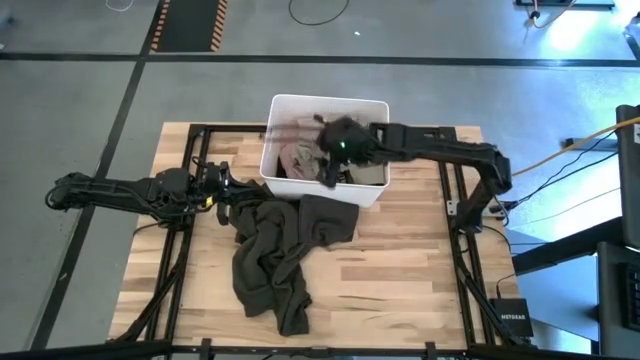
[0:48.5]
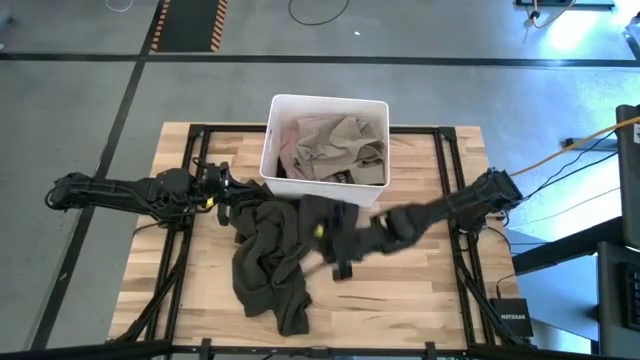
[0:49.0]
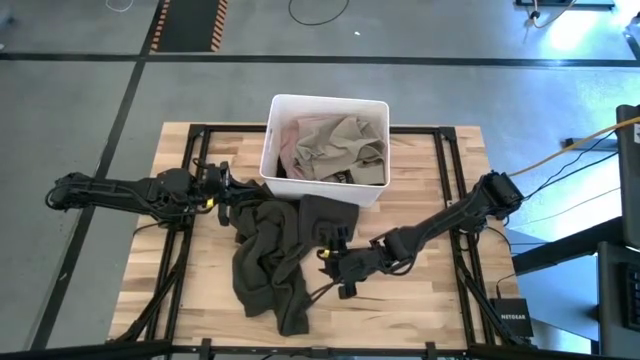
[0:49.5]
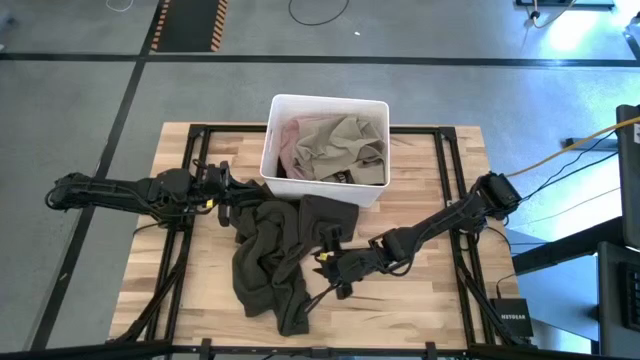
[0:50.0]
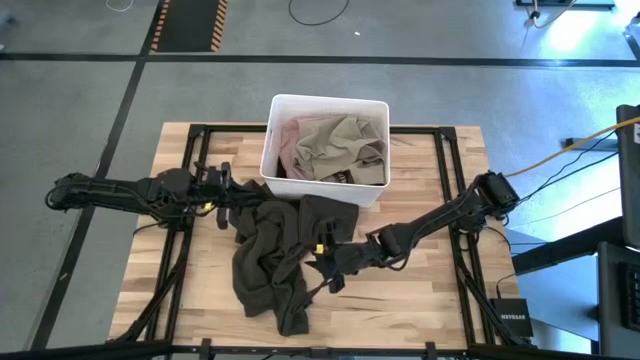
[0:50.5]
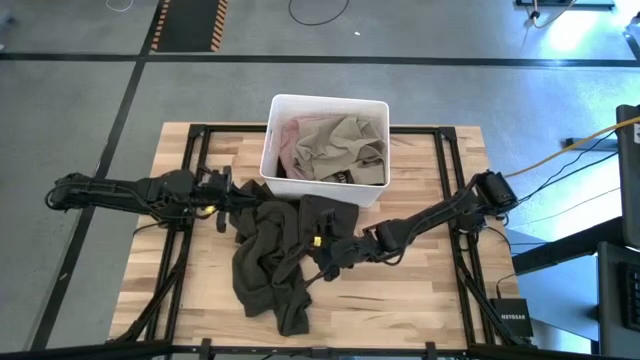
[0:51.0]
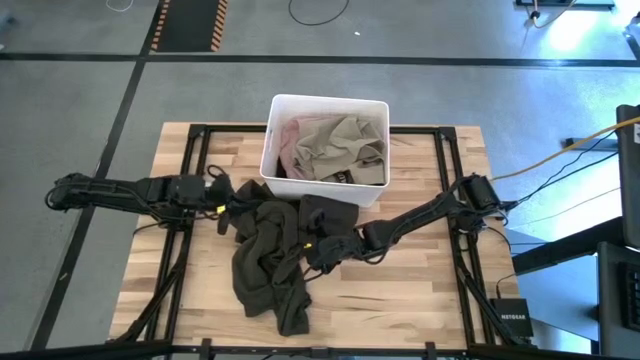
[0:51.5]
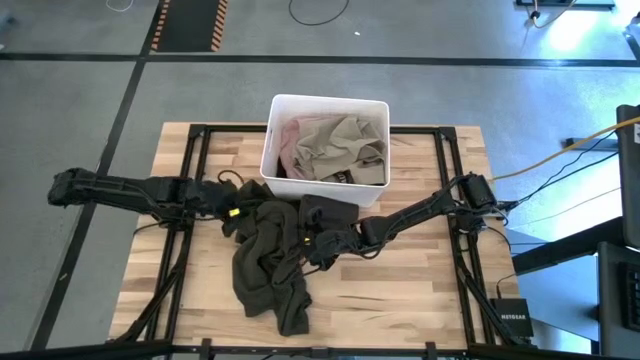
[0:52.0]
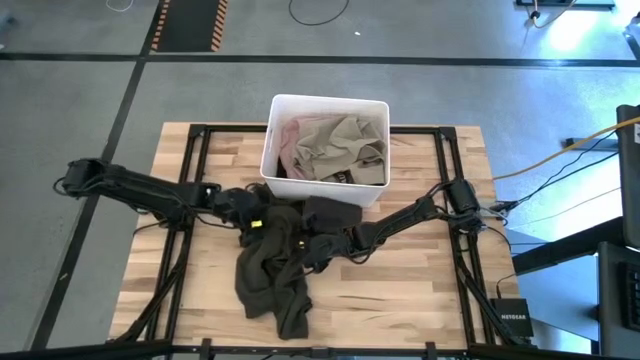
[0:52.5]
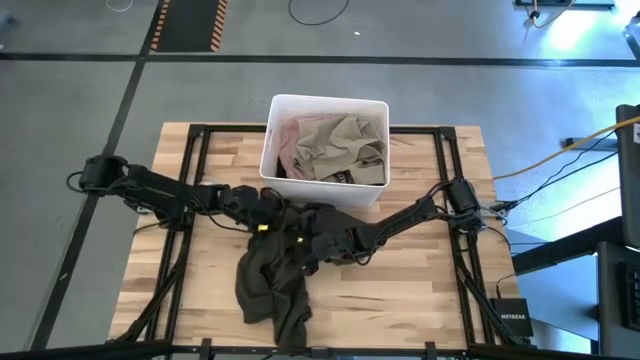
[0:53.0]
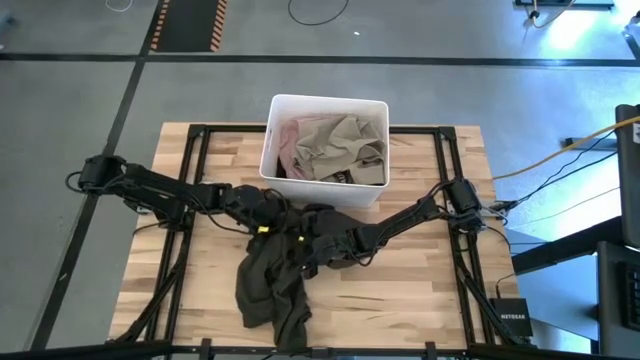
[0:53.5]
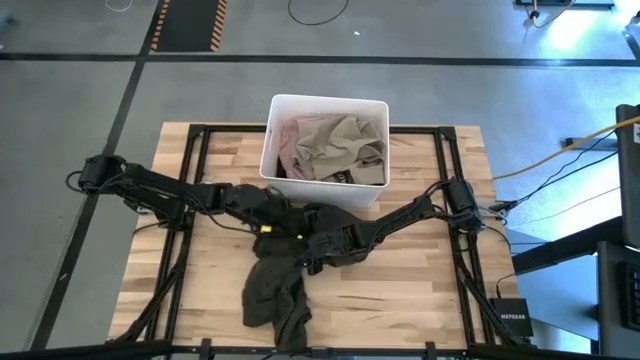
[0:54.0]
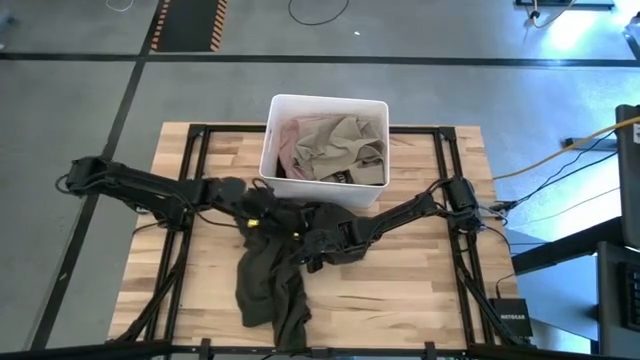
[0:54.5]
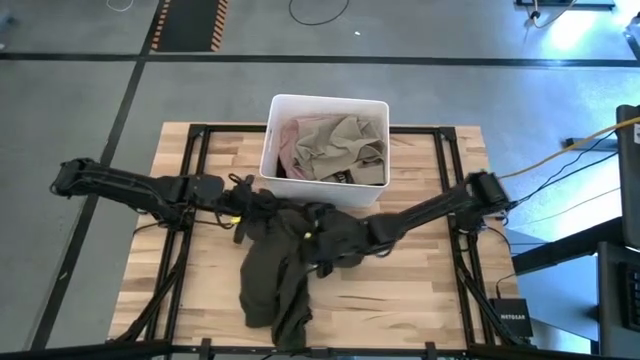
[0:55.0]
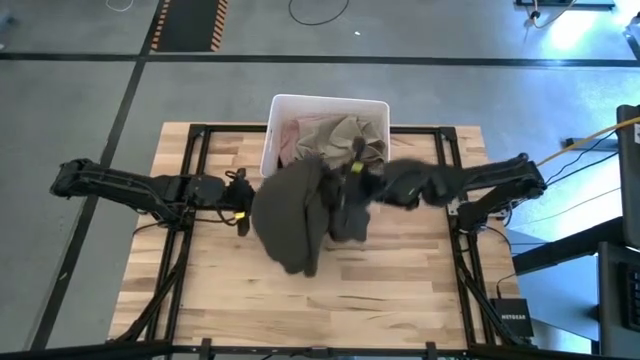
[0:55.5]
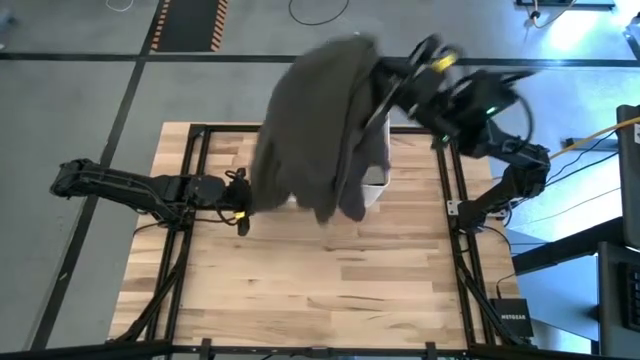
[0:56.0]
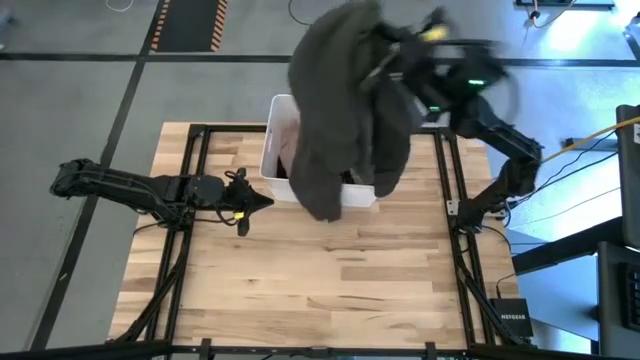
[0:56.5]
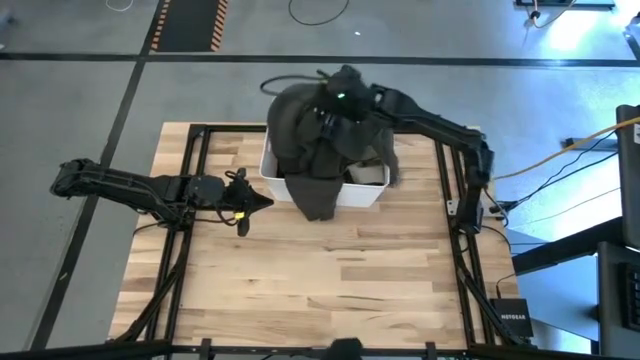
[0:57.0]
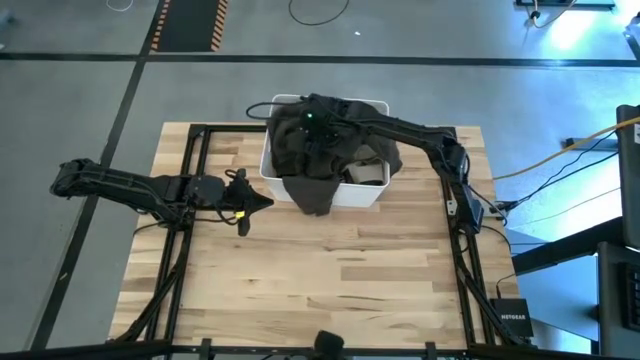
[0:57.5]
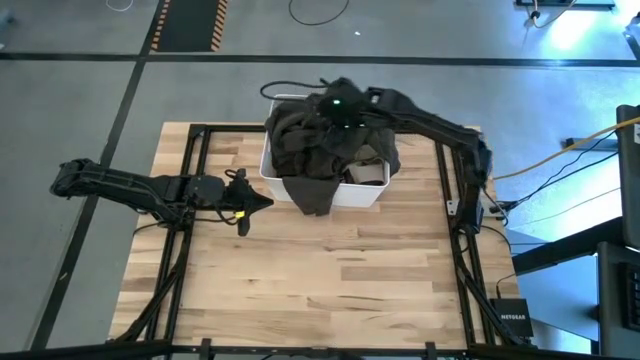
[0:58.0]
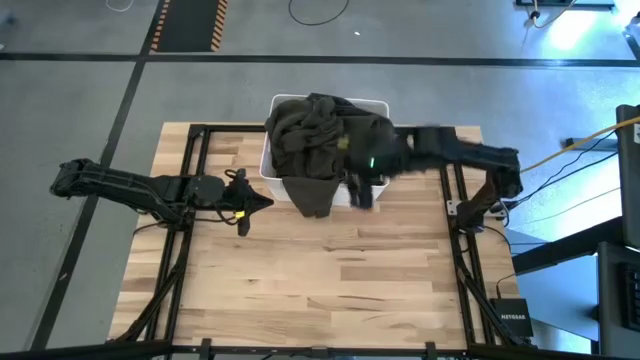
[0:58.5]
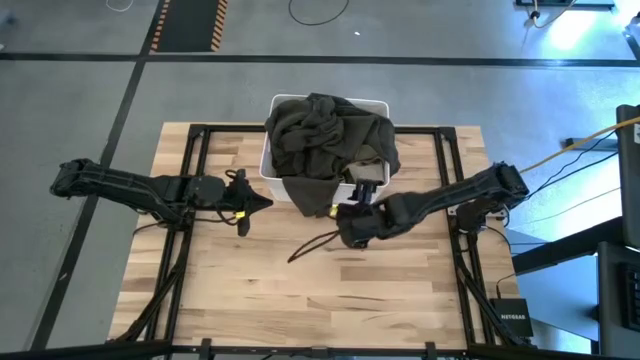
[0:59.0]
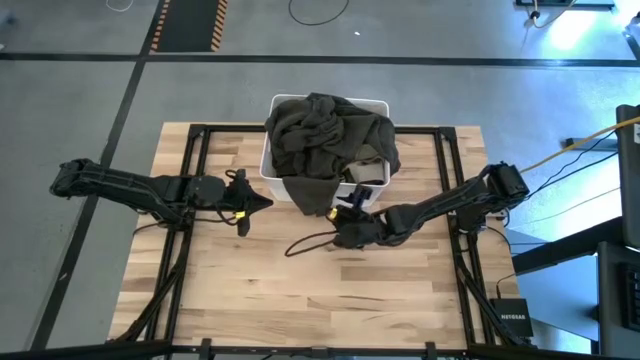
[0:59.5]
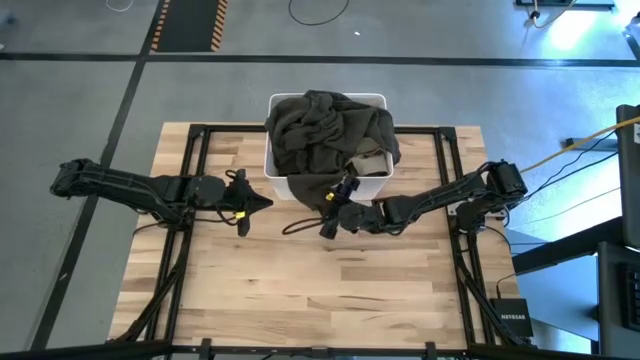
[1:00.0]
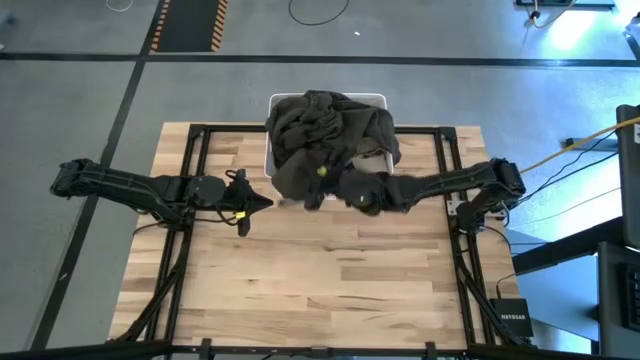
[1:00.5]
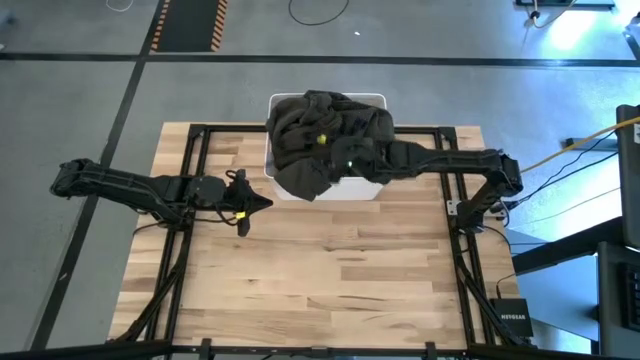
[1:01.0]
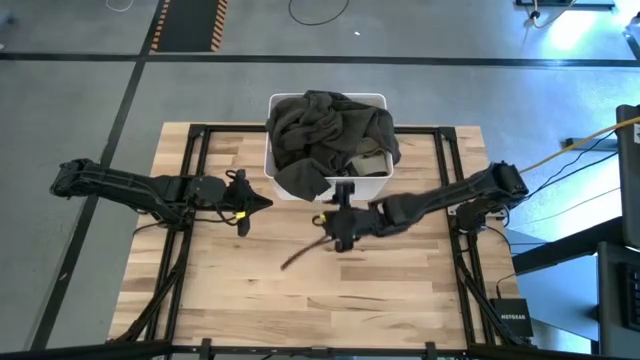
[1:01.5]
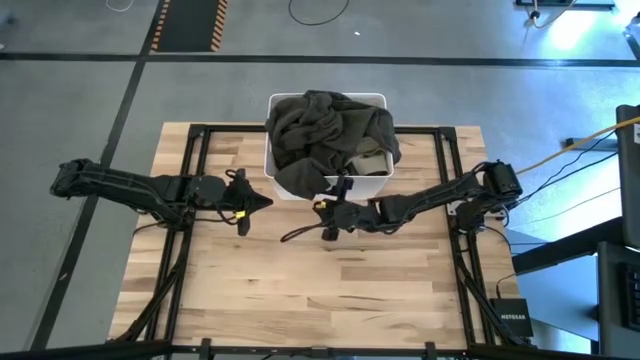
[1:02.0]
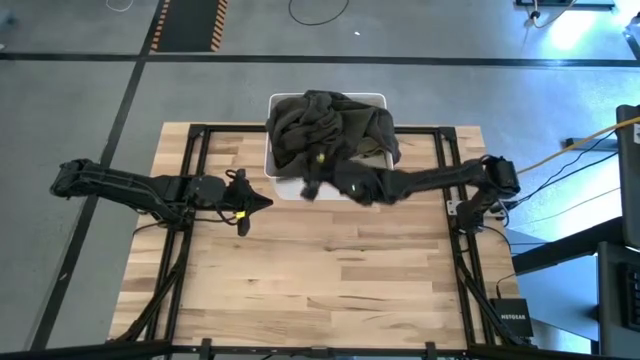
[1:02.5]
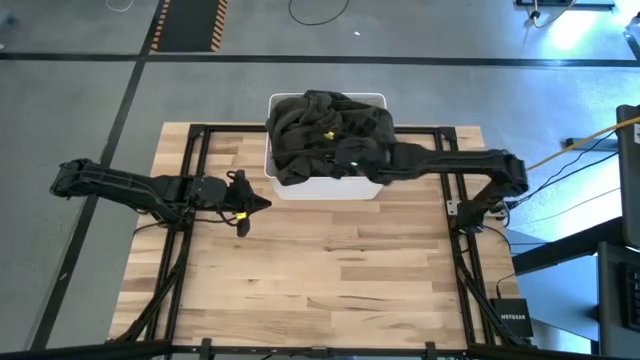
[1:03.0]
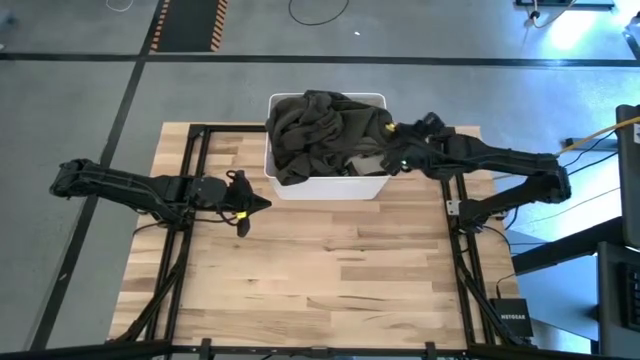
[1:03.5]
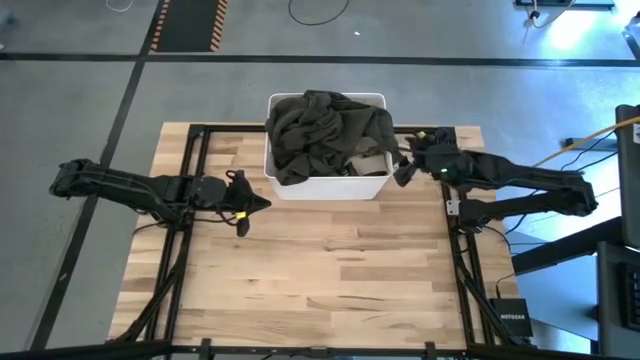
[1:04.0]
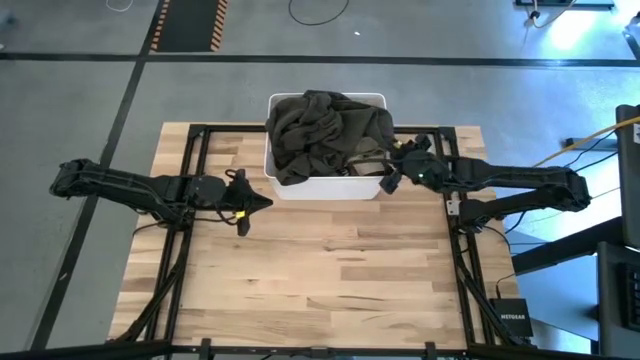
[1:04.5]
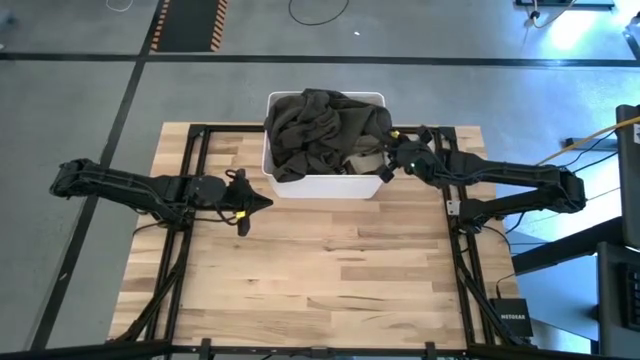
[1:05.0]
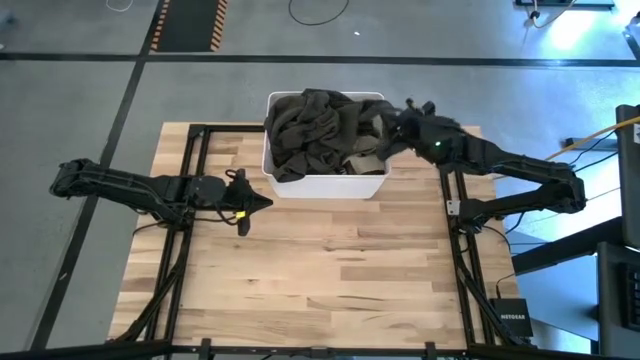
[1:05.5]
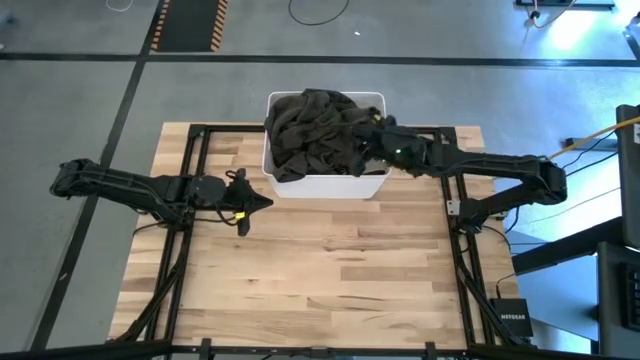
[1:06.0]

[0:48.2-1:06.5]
Task: Sort clothes
Put the black hoodie into the white laundry bin

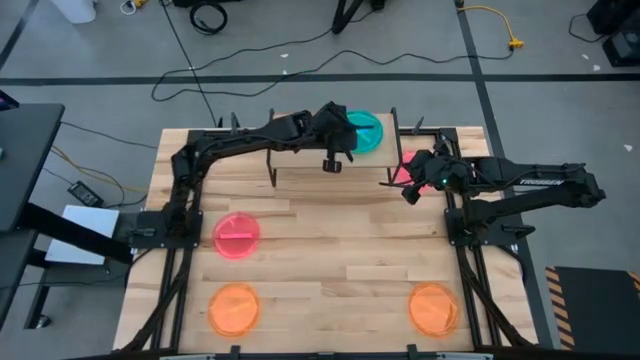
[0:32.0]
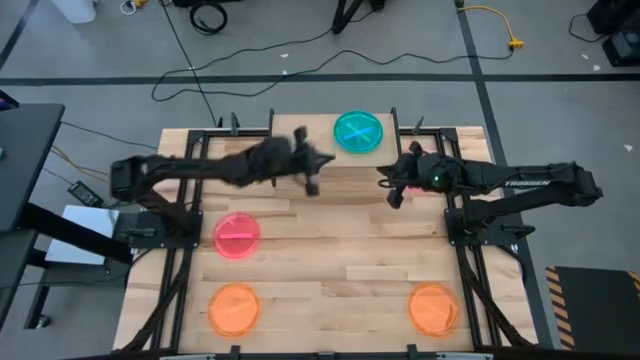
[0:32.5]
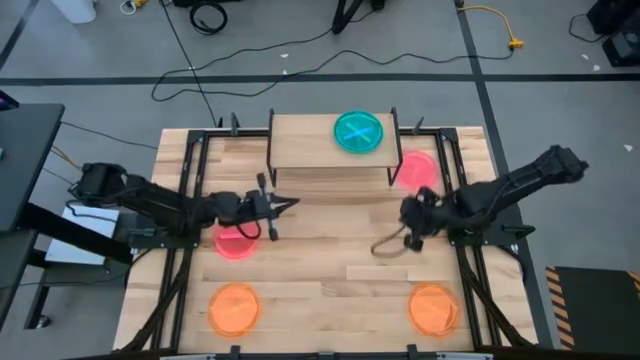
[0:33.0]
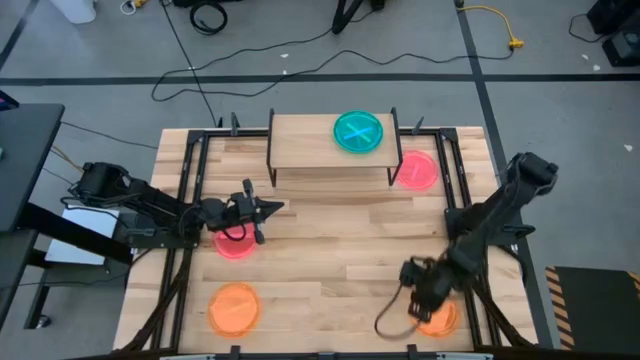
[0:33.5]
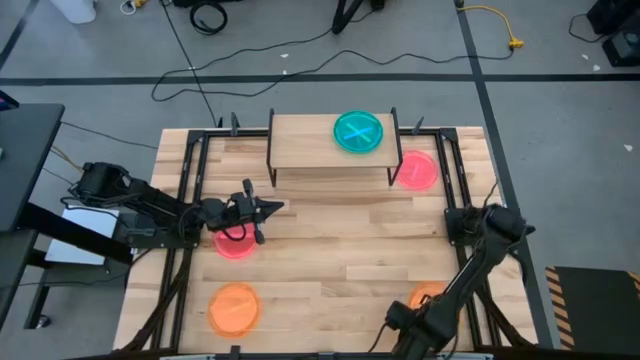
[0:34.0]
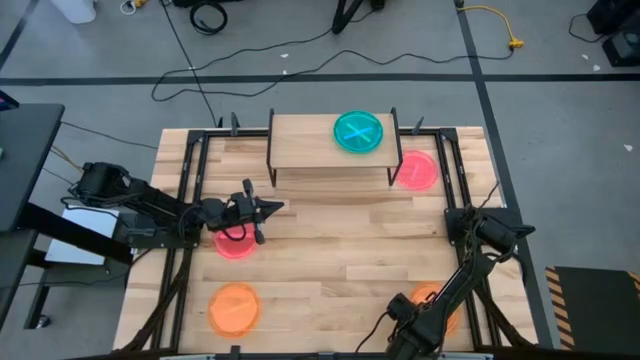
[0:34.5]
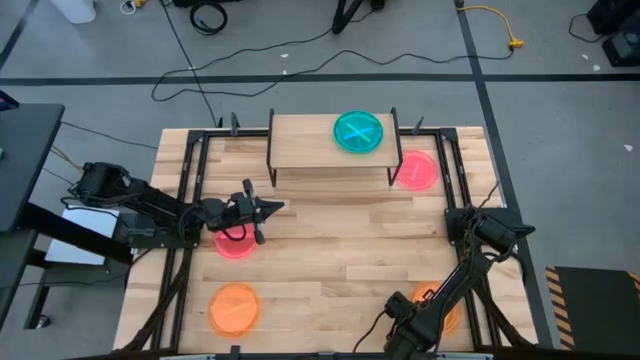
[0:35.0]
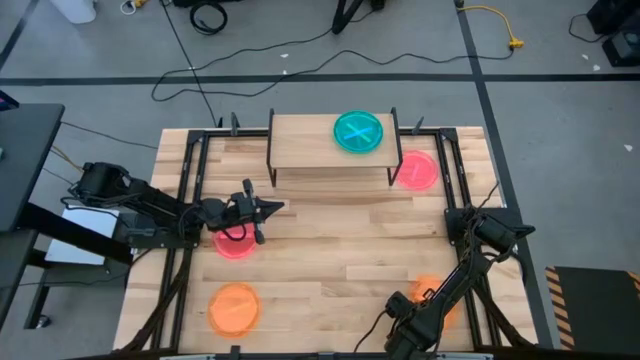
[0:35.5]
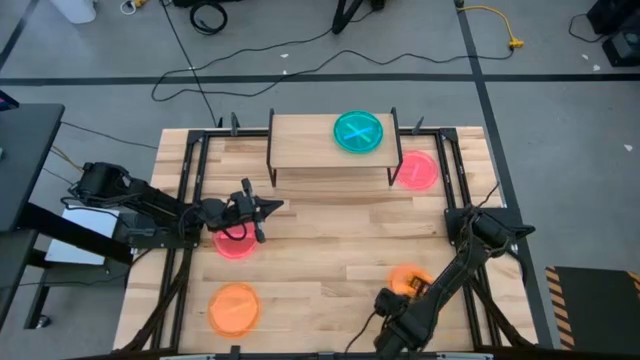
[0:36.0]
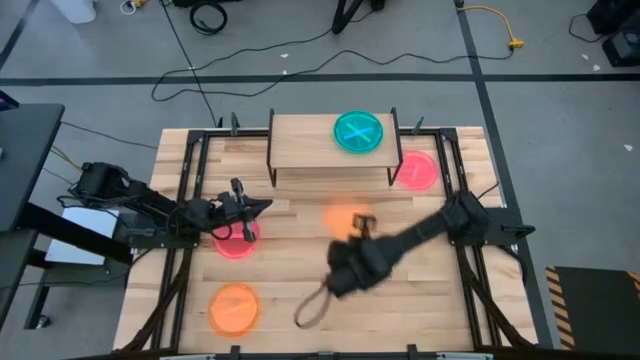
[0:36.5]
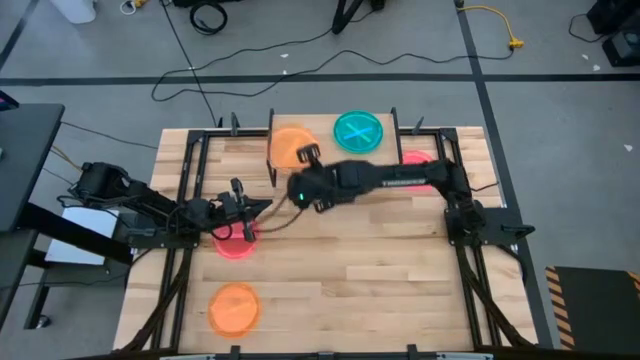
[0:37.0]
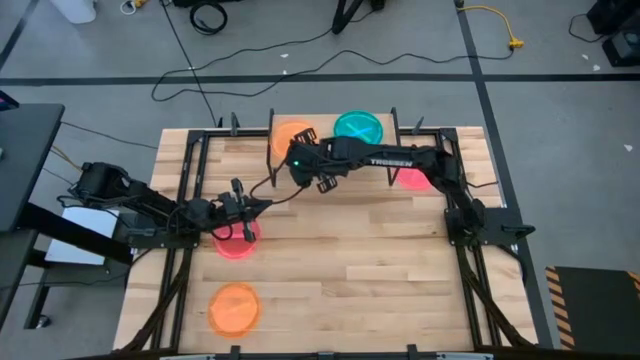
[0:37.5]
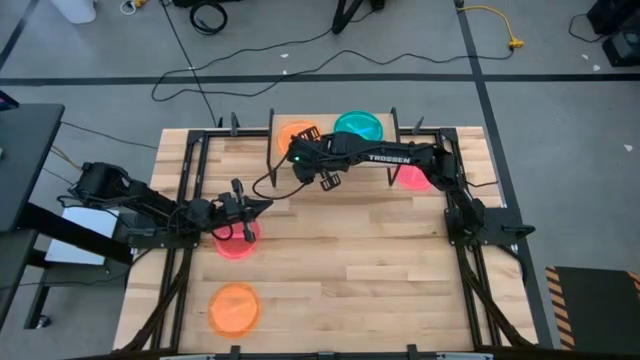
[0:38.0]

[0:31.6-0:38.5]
Task: Place and stack plates onto a shelf
Put the right orange plate on the shelf
